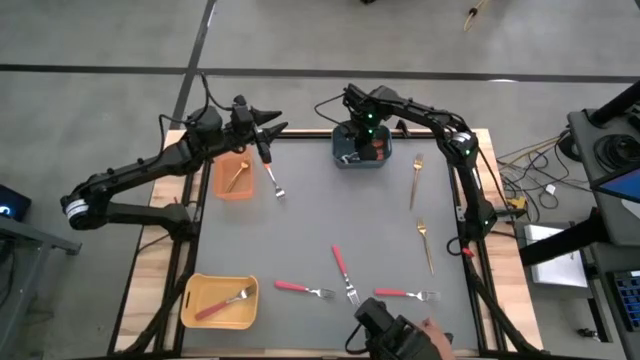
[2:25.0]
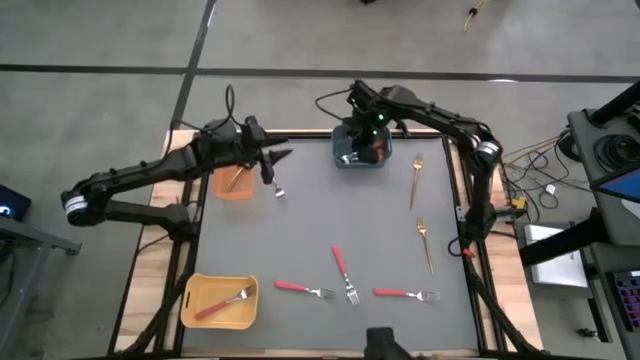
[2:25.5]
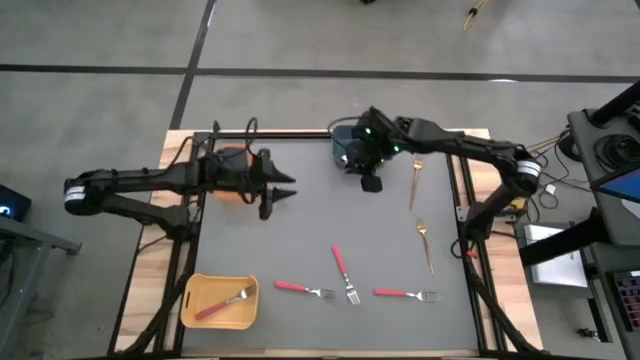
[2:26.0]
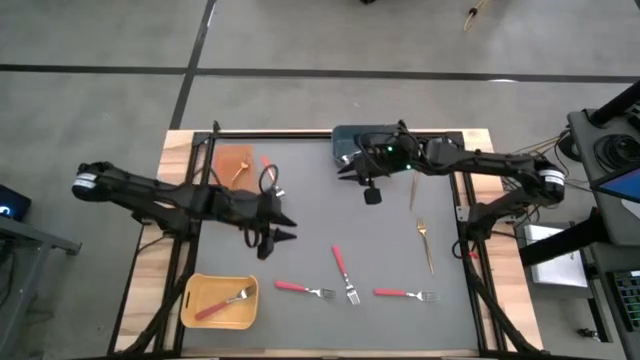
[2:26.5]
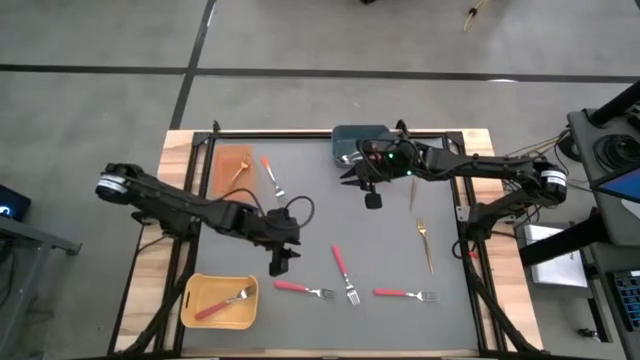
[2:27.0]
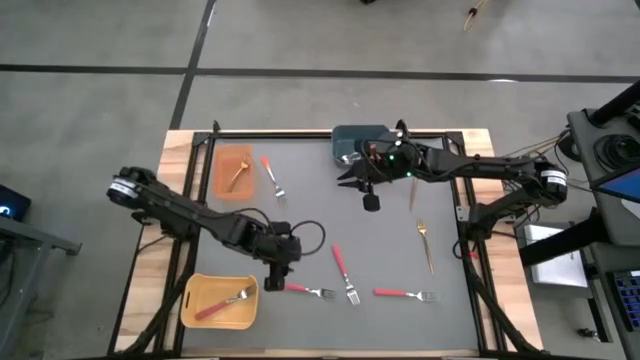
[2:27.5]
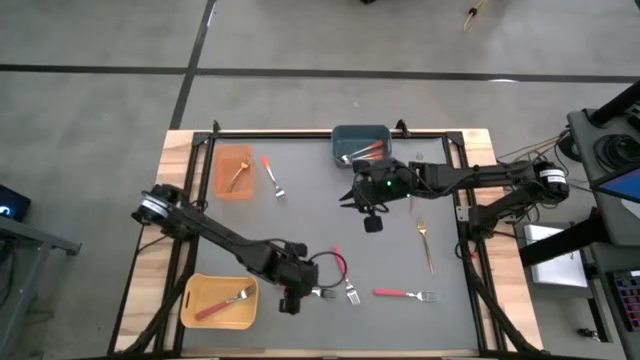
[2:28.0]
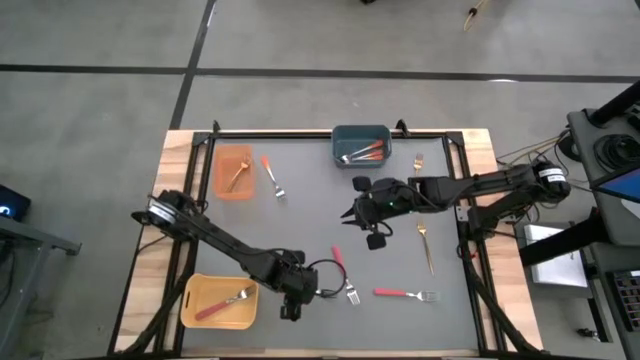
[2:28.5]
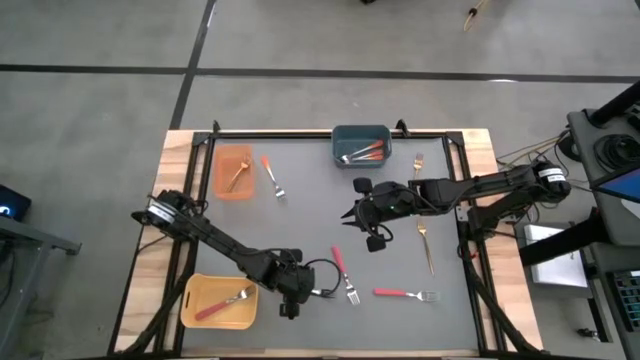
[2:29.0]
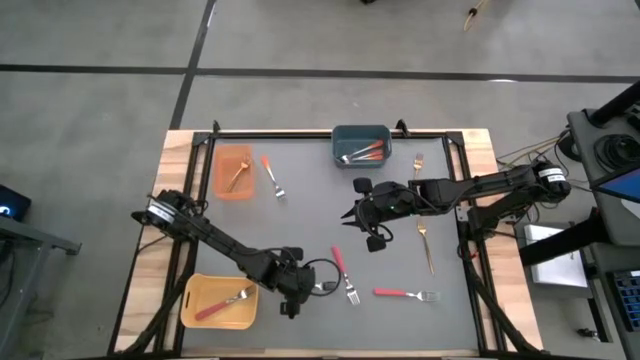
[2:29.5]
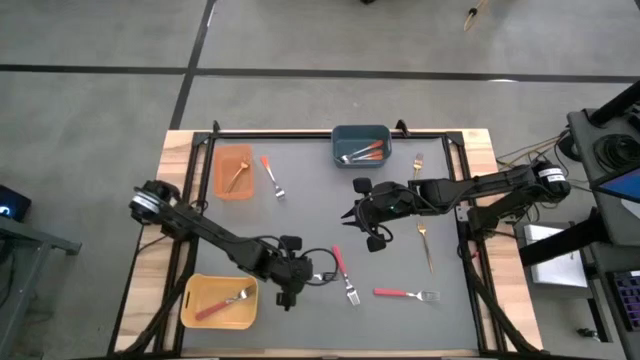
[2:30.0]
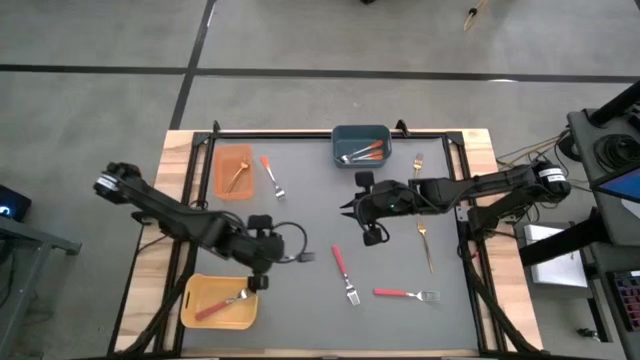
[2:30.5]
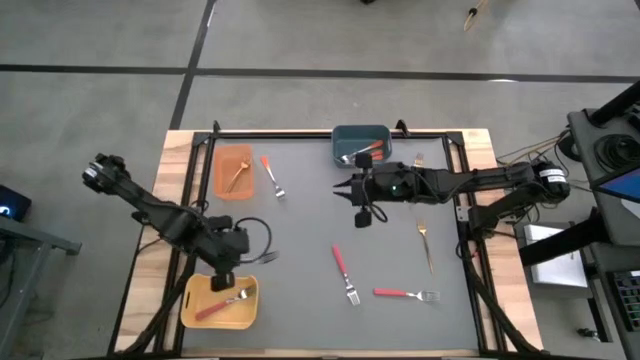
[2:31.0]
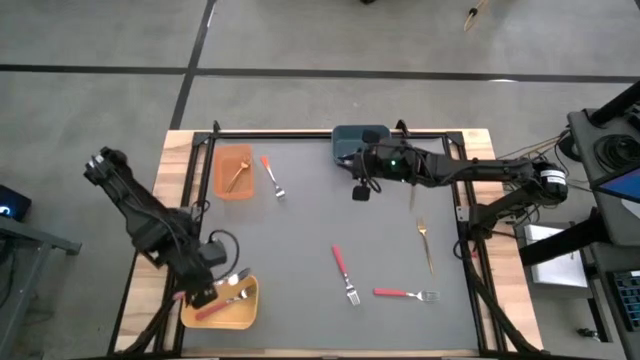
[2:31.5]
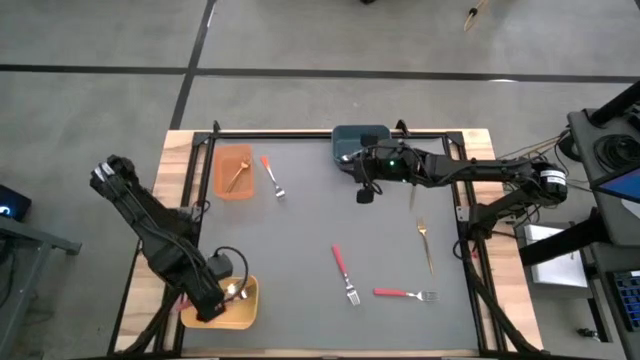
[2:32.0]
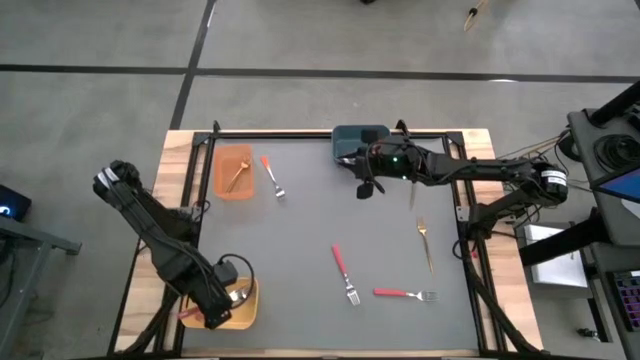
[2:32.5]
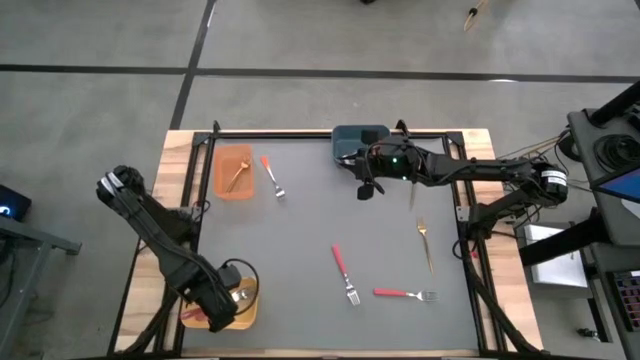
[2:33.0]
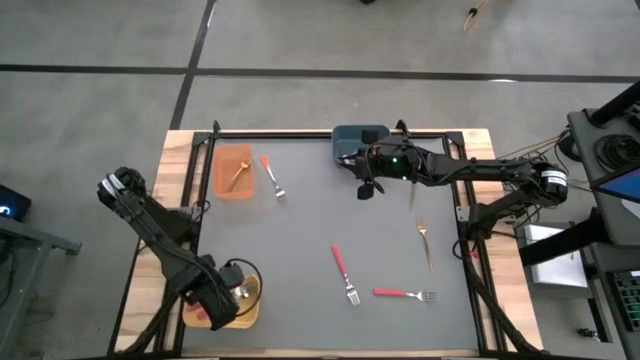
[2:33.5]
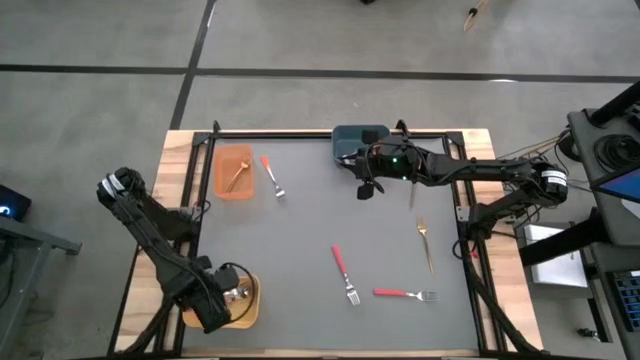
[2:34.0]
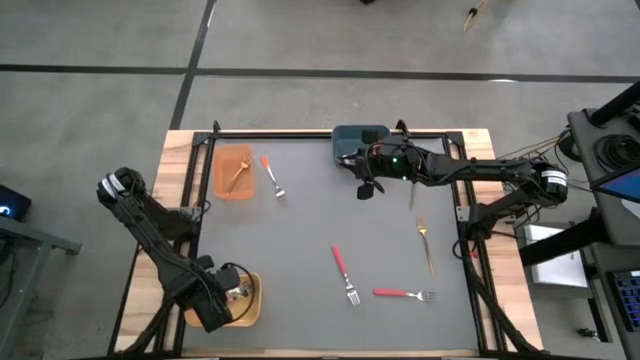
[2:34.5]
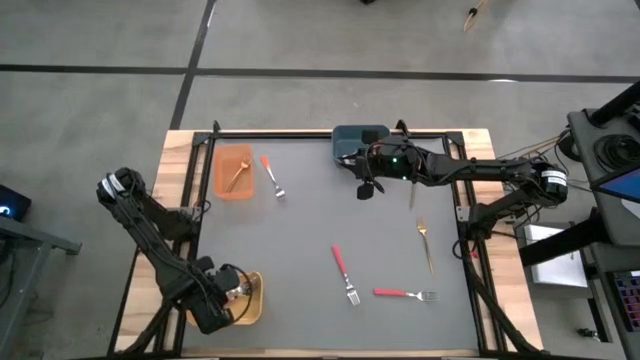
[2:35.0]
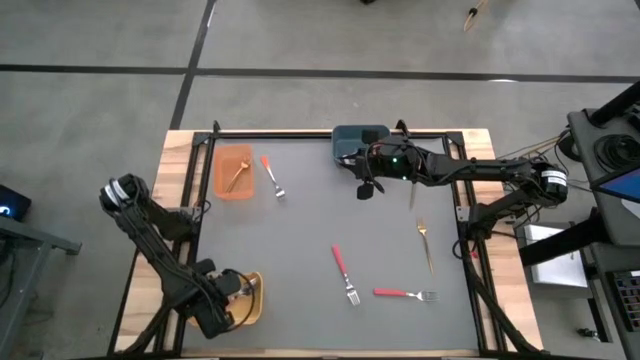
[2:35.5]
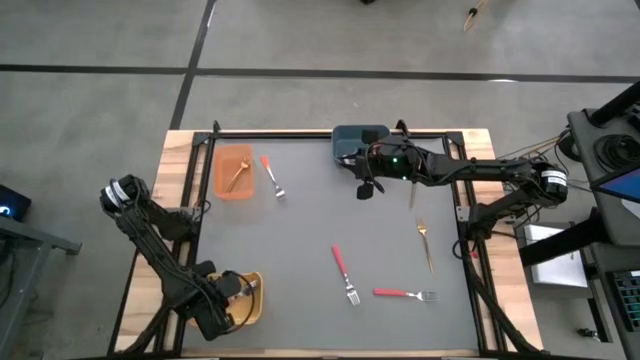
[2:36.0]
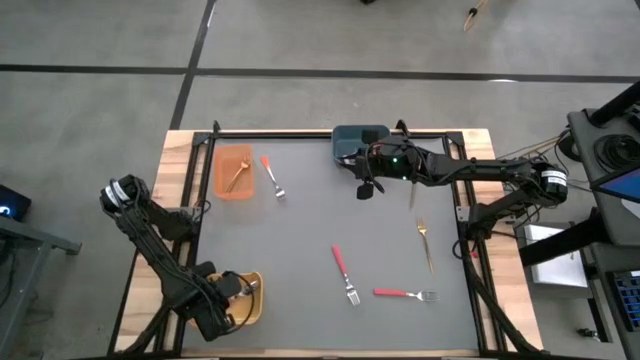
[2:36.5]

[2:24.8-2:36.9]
Task: Sort silverware by color (type)
Put the pink fork into the yellow bin

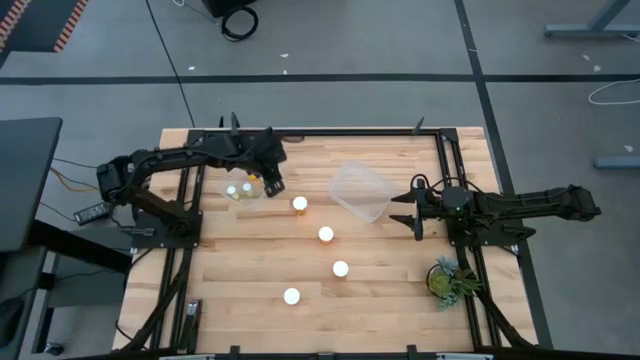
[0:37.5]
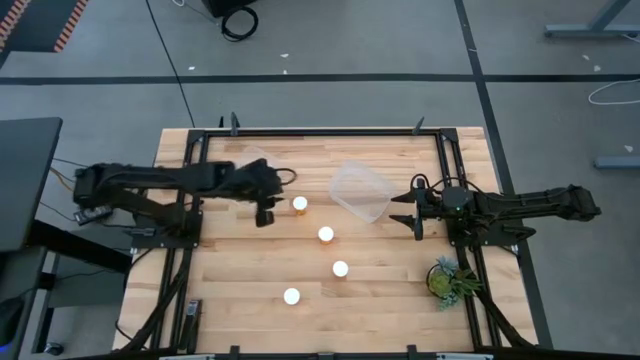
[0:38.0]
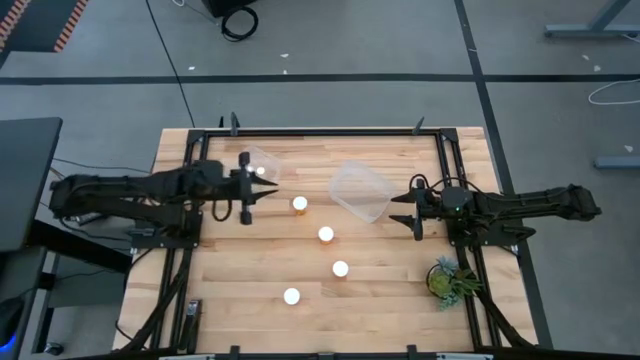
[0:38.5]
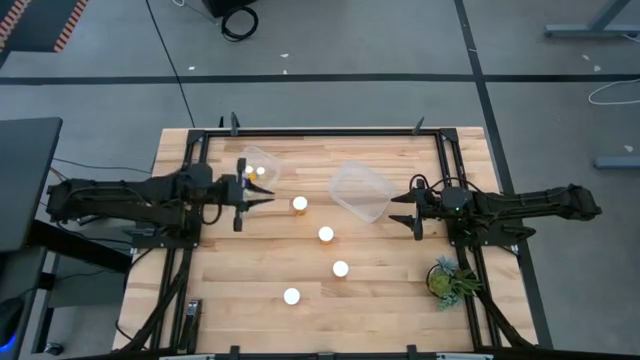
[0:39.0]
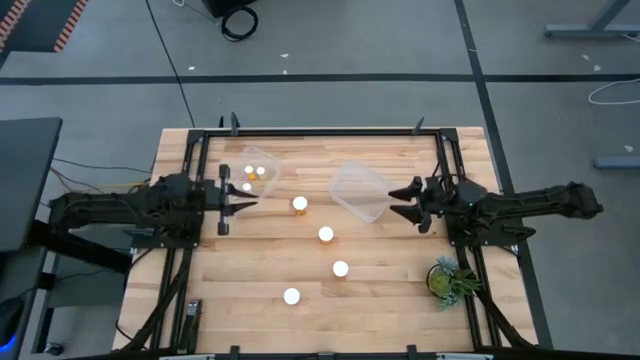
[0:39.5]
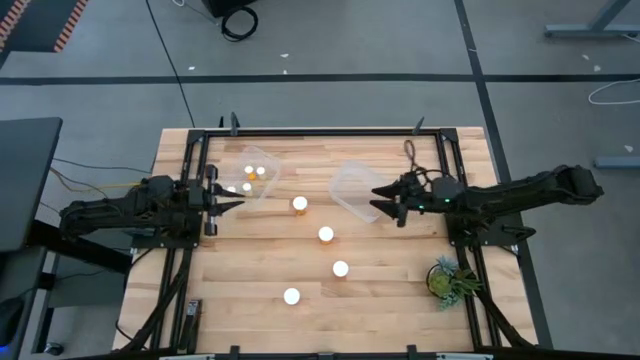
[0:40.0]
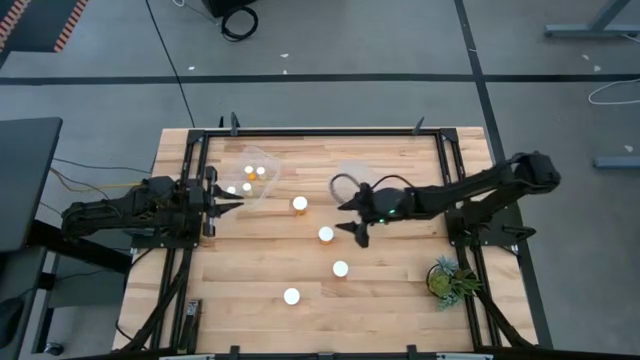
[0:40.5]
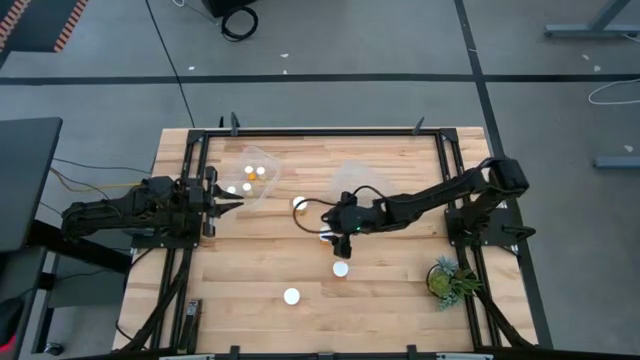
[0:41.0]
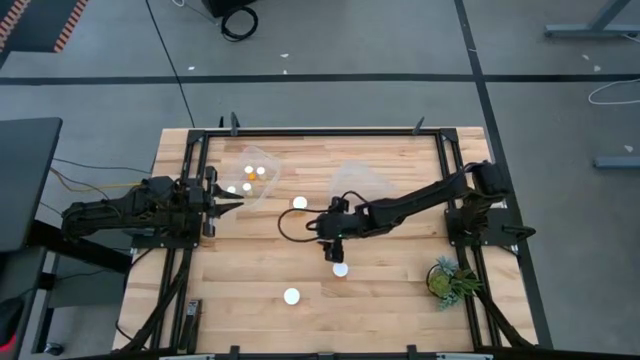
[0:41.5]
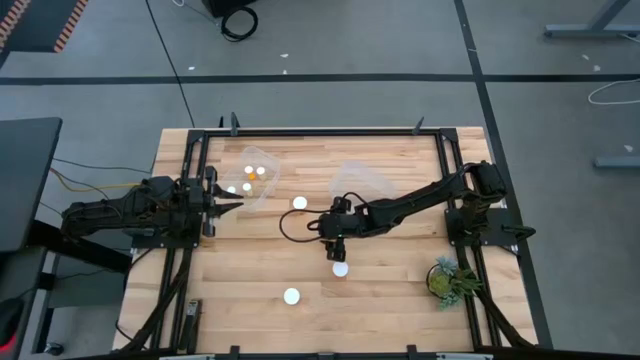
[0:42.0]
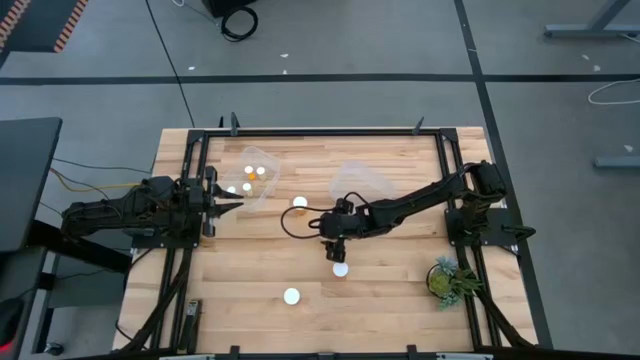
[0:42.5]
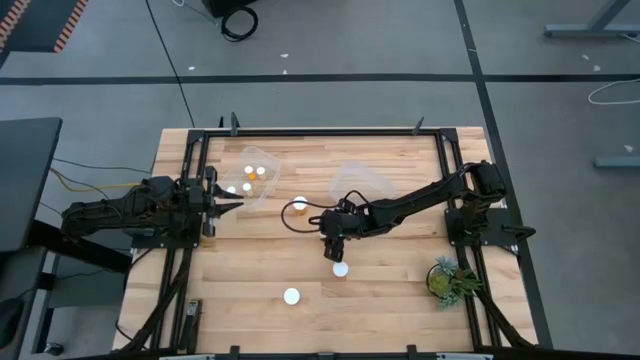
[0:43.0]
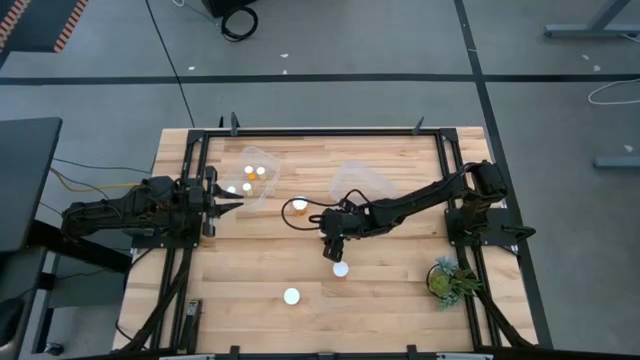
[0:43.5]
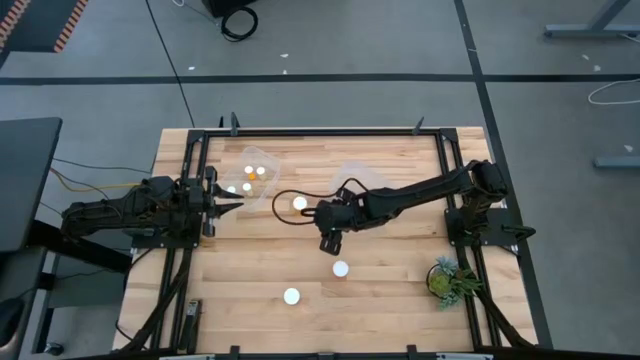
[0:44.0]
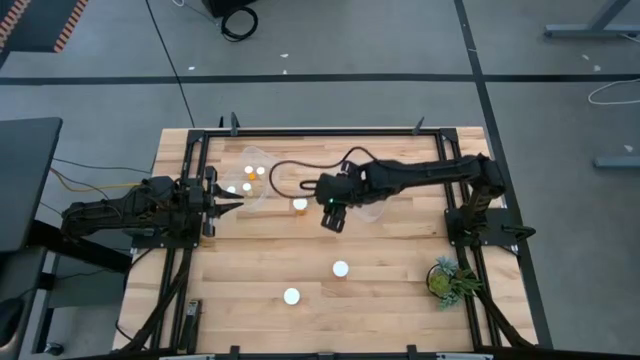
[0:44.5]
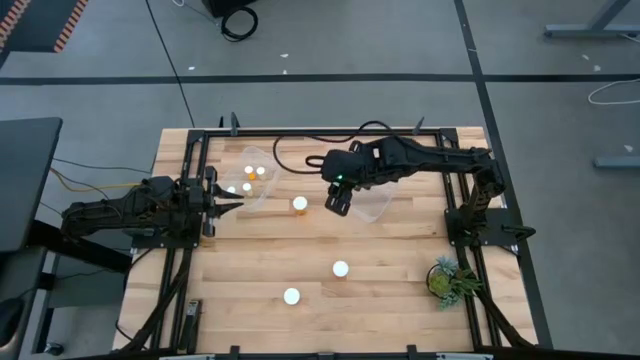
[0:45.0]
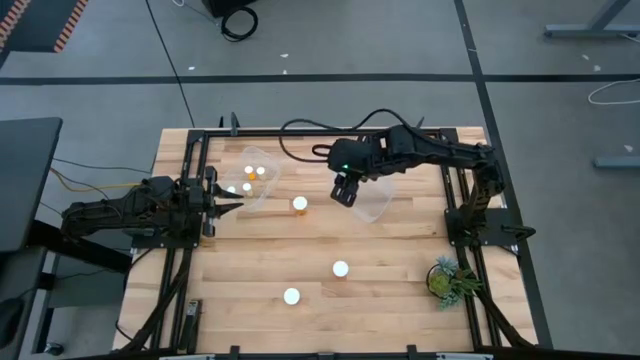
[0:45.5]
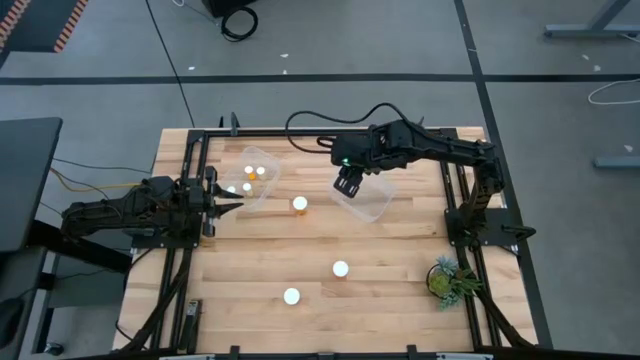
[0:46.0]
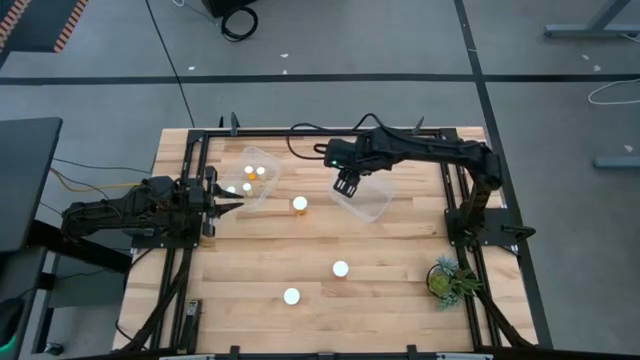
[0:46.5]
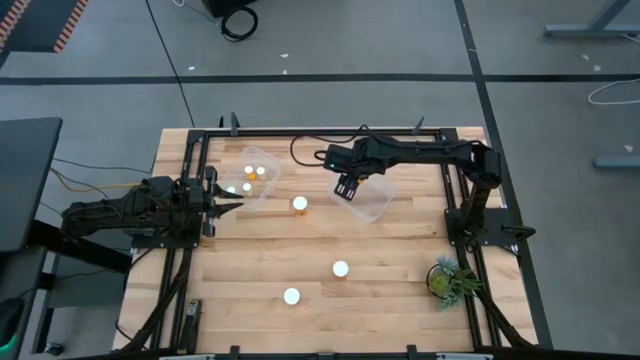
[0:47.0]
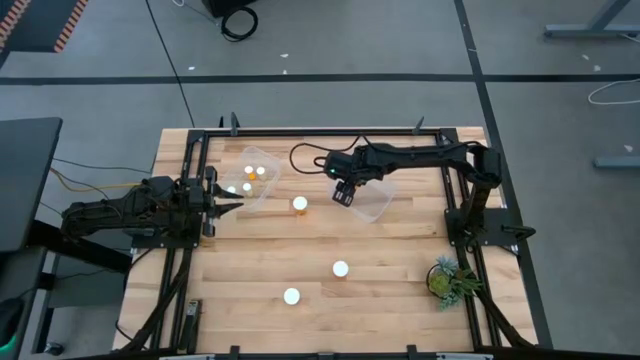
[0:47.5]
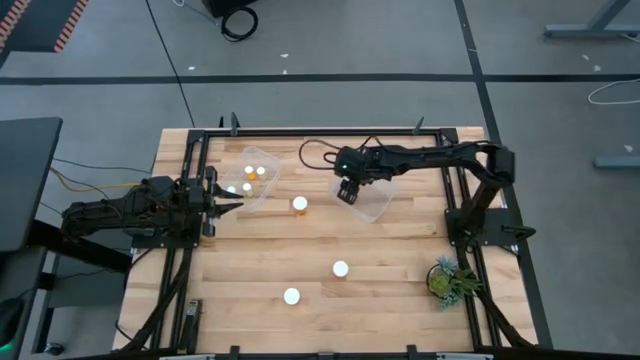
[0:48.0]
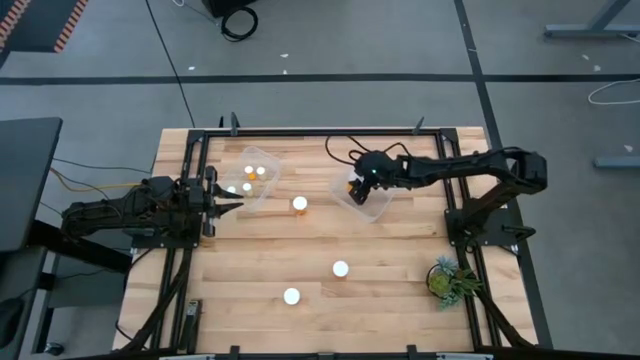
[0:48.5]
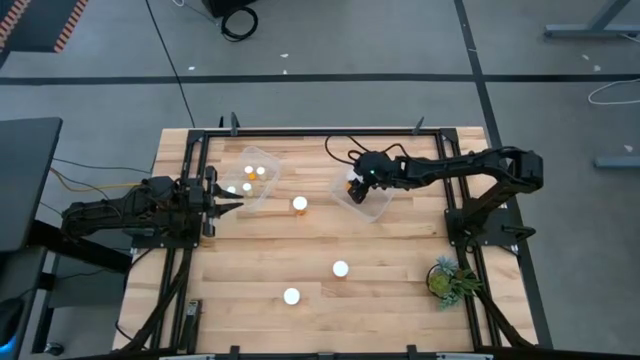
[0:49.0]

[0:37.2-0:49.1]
Task: Pick and place medicine bottles into bin by pill shape (circle, oval)
Put the big orange pill bottle into the right transparent bin
